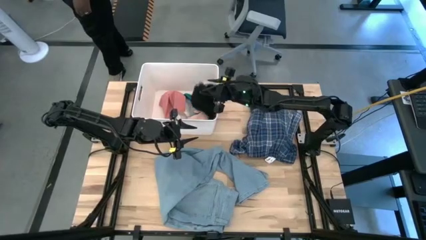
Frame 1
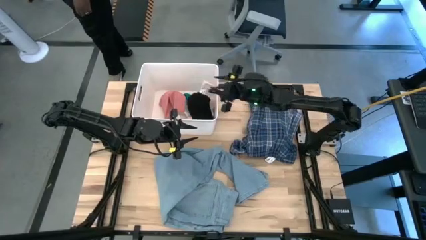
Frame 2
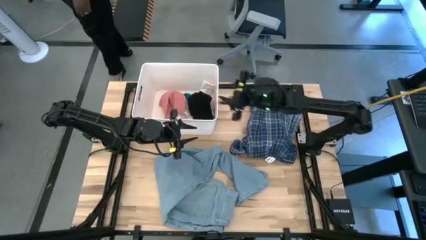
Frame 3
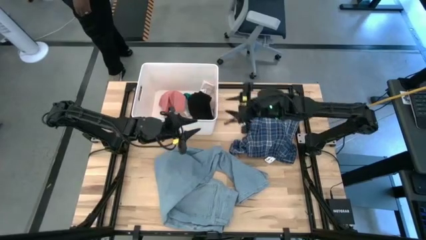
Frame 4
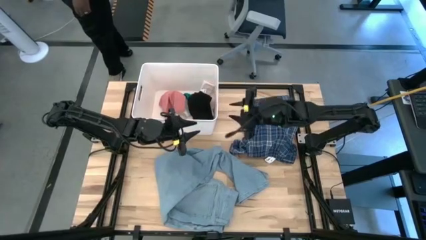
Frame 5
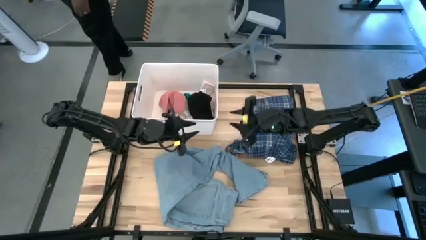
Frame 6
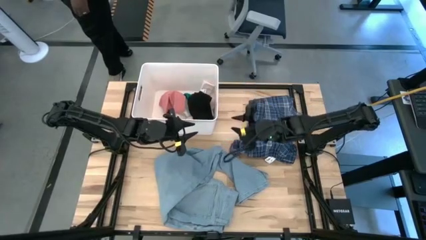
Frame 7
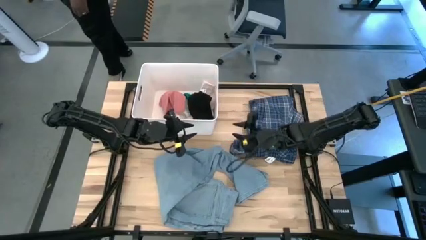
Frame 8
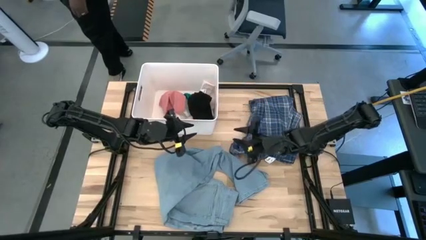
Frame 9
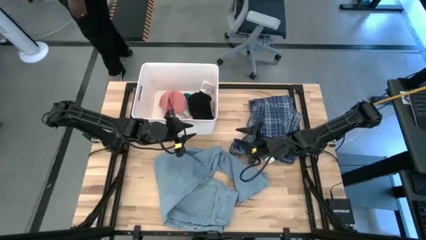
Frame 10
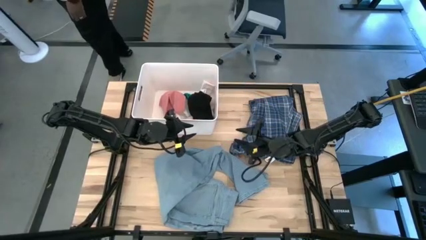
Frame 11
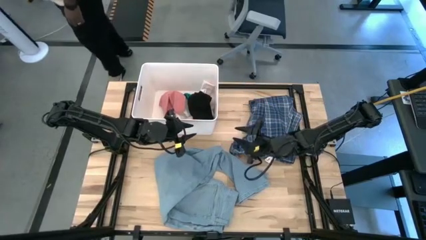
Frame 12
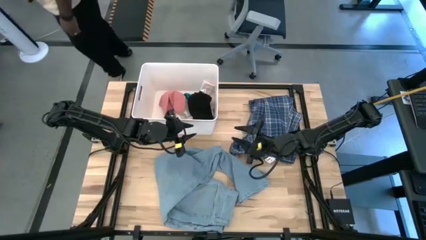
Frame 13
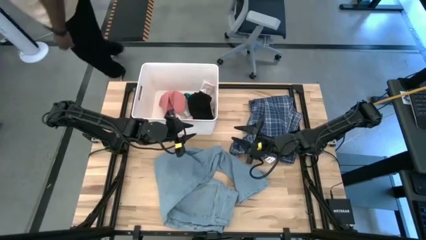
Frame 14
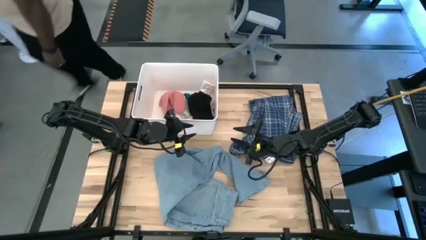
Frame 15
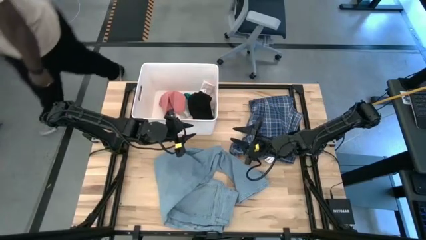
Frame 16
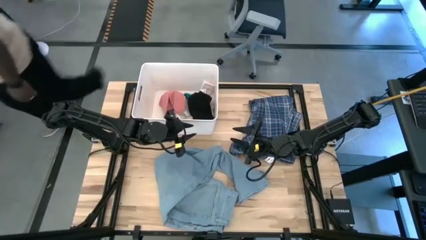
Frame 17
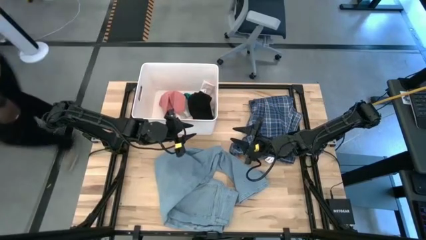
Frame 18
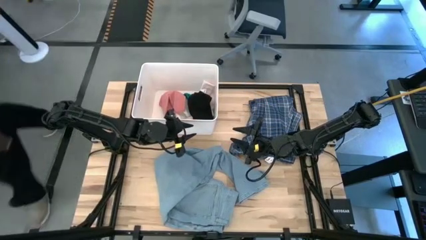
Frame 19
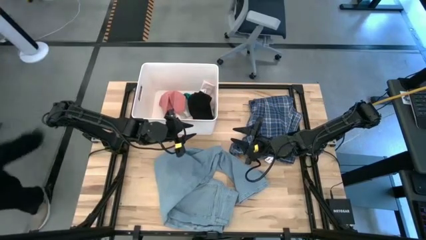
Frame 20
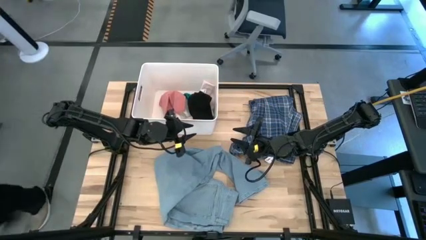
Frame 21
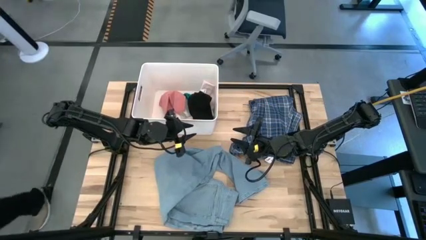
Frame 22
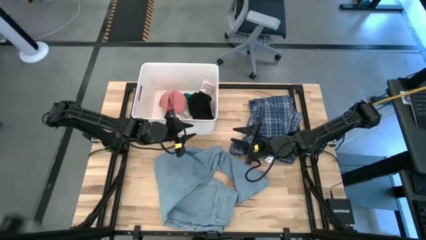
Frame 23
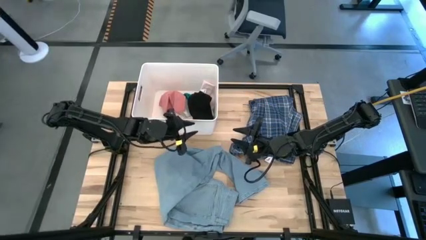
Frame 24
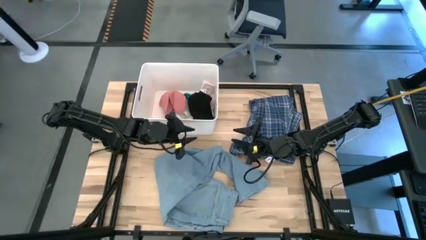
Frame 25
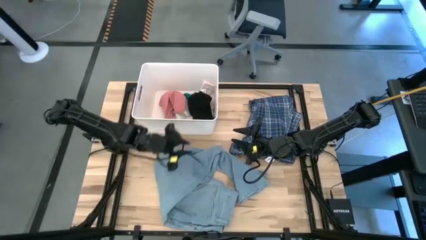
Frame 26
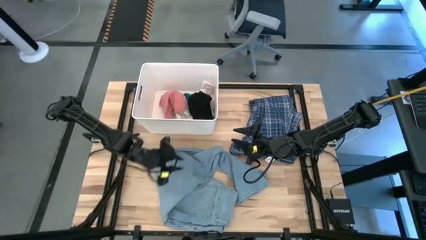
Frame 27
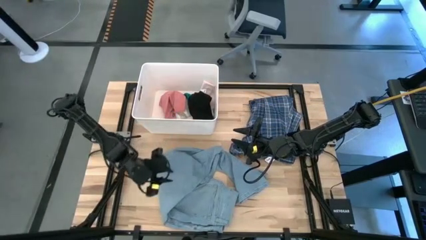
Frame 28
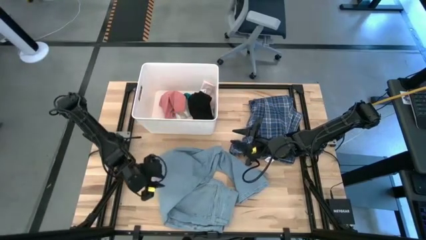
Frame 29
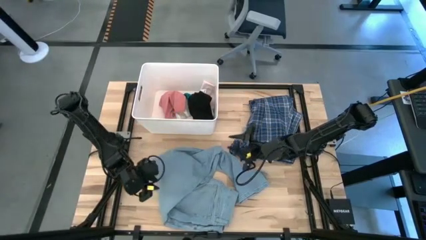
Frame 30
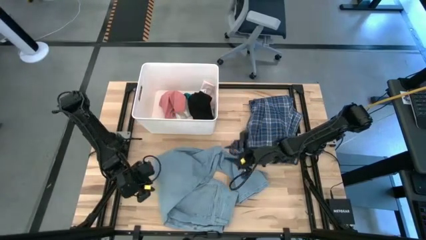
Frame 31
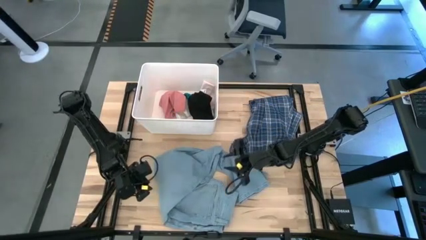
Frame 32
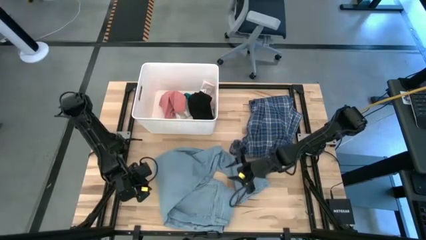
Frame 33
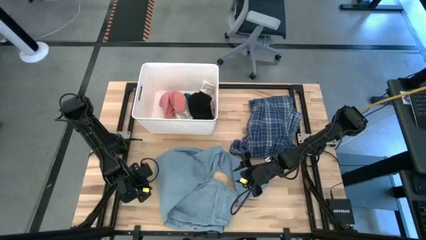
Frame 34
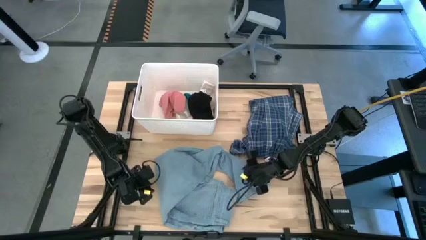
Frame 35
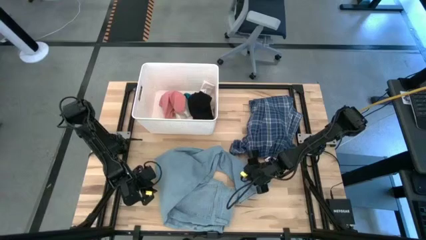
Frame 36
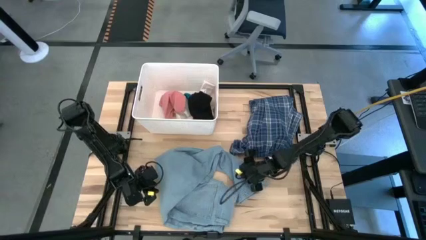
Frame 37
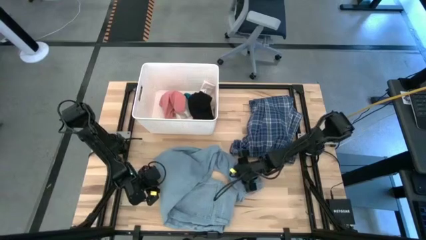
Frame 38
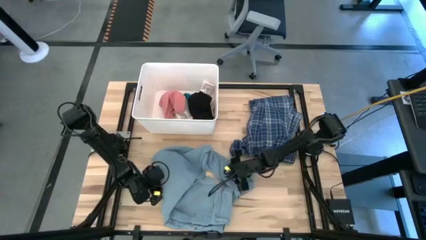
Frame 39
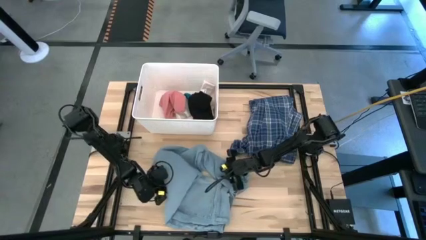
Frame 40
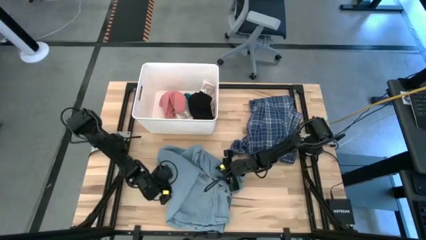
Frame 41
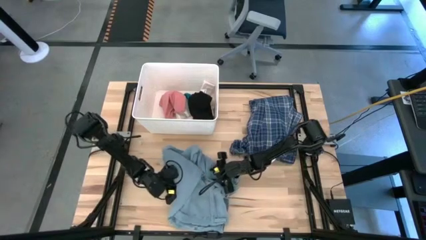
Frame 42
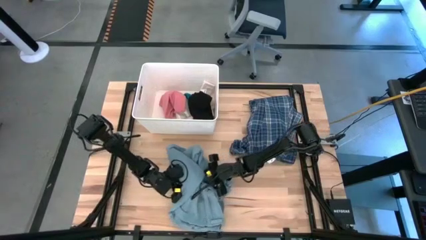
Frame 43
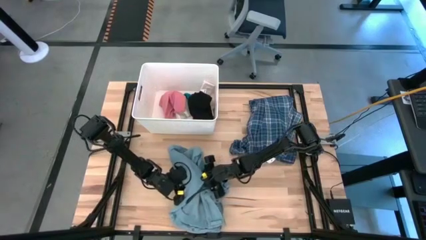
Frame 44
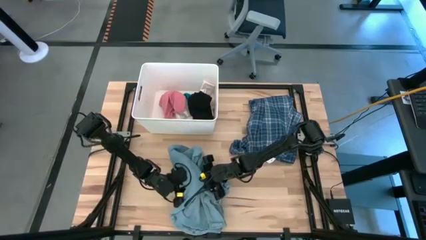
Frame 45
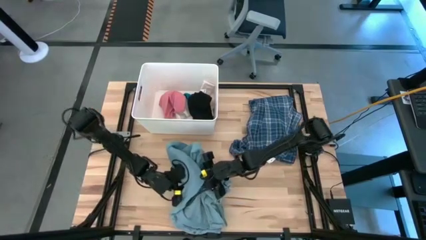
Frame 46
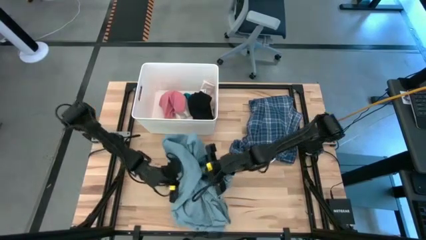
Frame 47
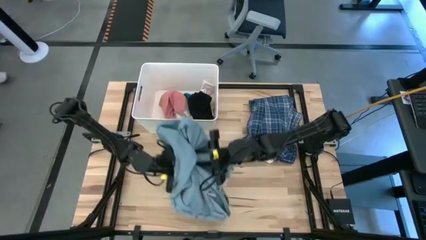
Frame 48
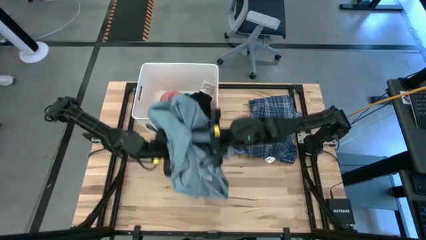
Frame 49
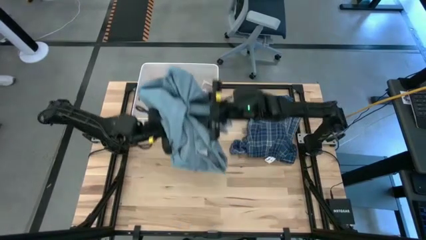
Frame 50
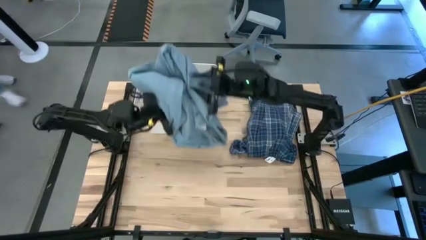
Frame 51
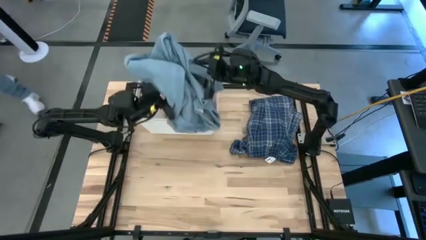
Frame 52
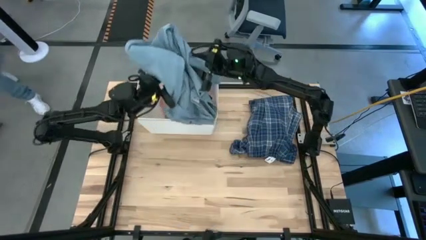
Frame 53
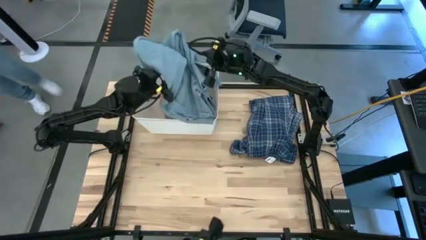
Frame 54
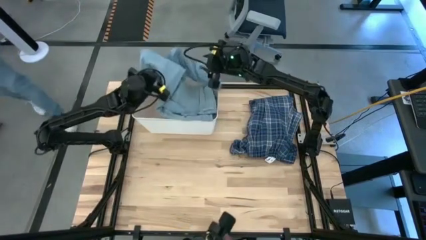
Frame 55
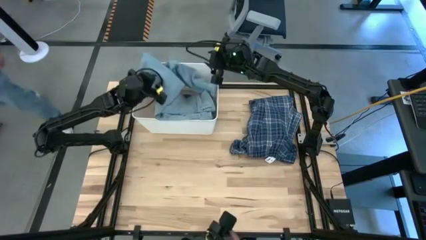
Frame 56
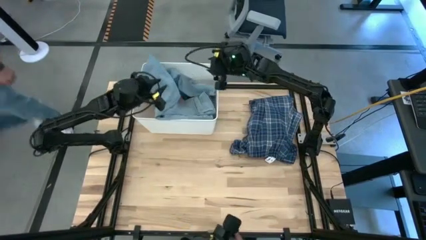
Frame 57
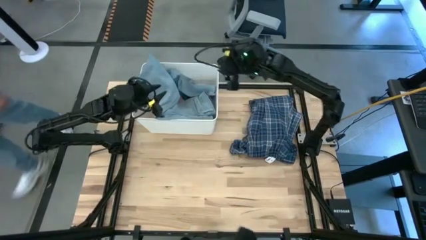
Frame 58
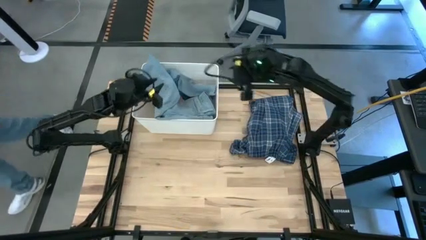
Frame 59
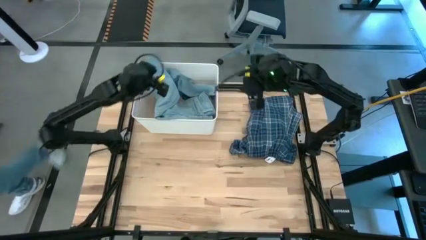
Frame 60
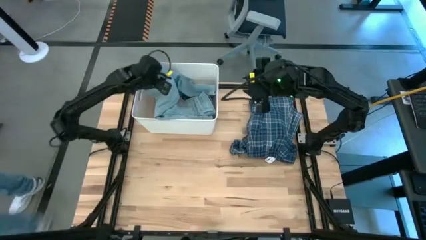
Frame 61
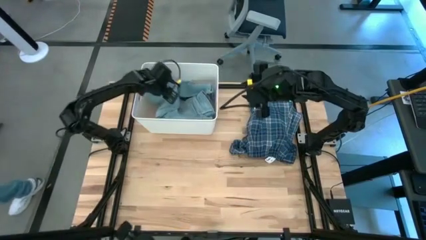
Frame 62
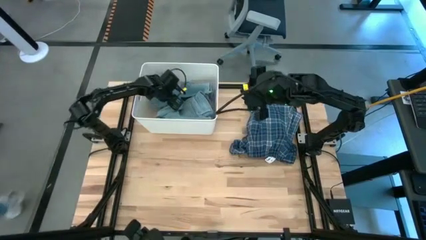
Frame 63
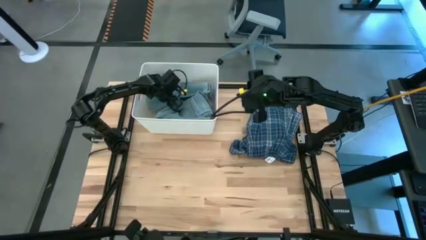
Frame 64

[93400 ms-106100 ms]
Task: Sort clothes
Put the blue pants into the white bin

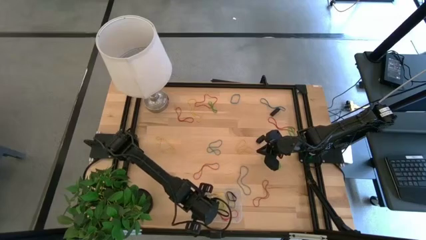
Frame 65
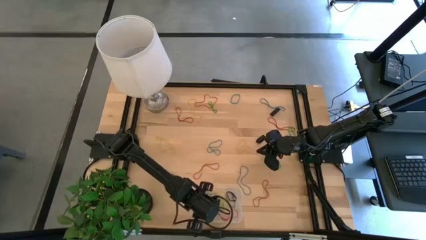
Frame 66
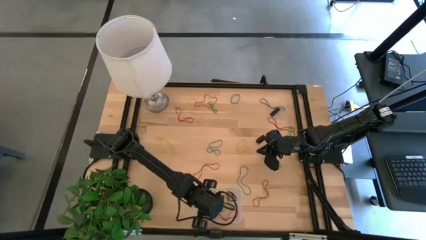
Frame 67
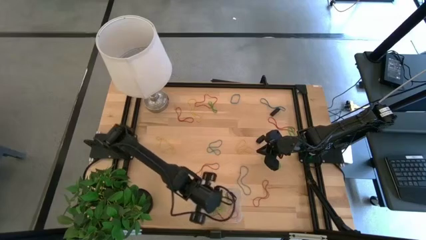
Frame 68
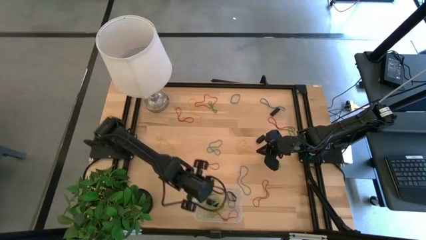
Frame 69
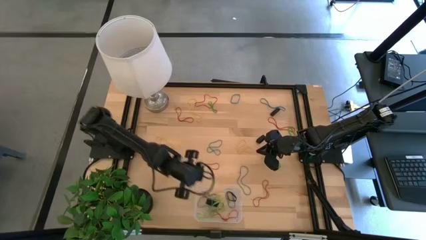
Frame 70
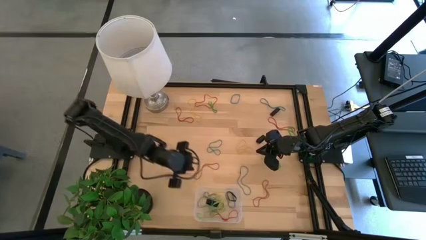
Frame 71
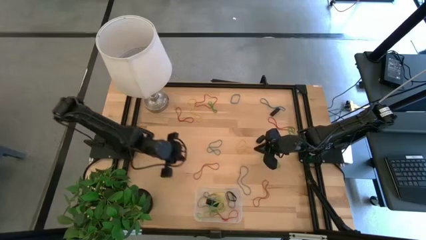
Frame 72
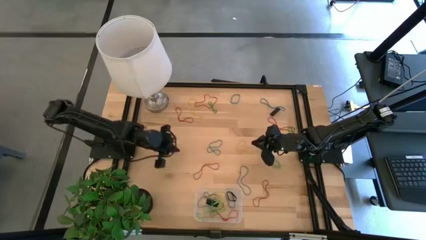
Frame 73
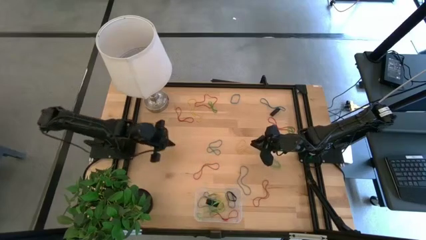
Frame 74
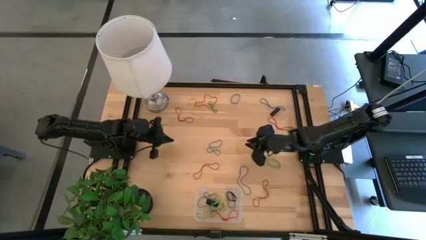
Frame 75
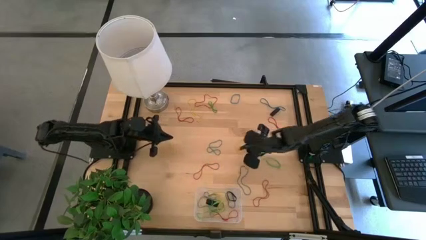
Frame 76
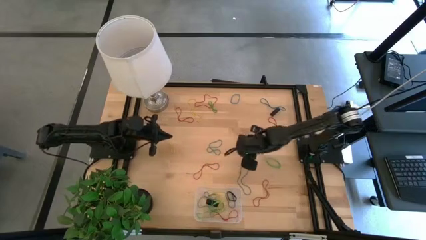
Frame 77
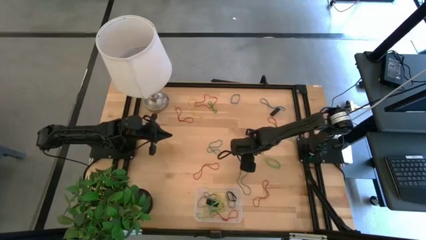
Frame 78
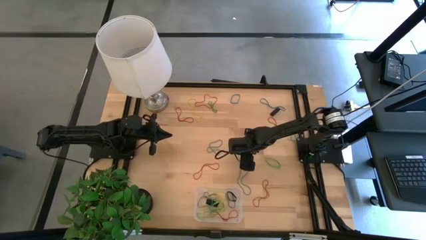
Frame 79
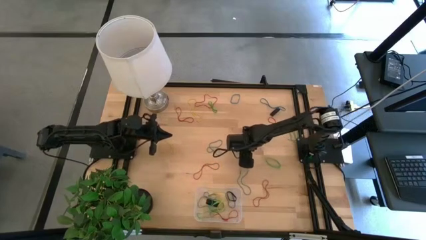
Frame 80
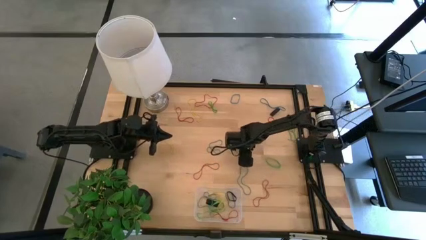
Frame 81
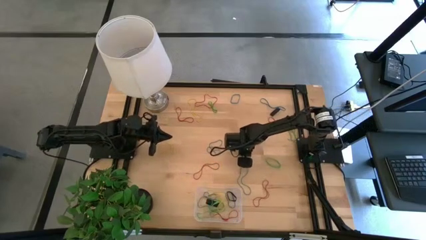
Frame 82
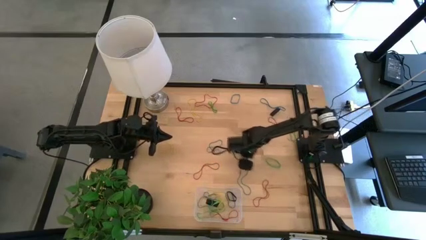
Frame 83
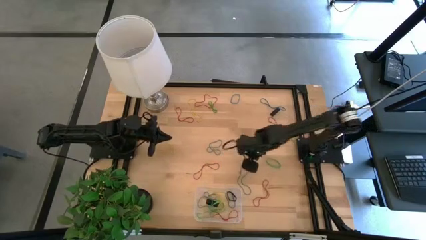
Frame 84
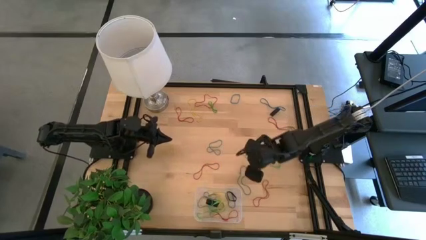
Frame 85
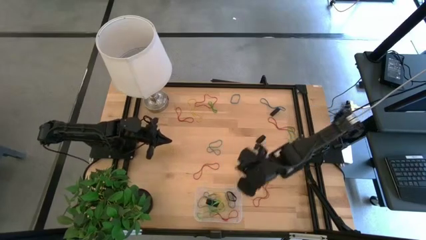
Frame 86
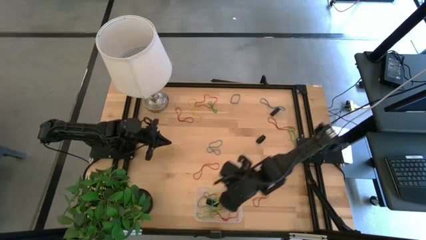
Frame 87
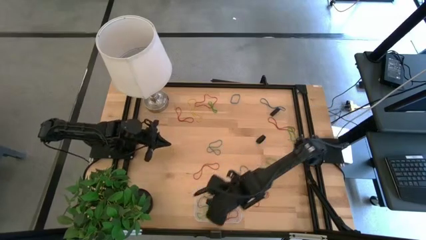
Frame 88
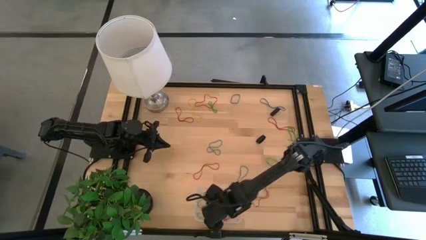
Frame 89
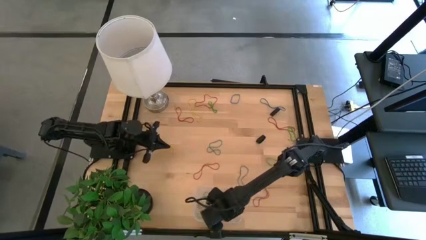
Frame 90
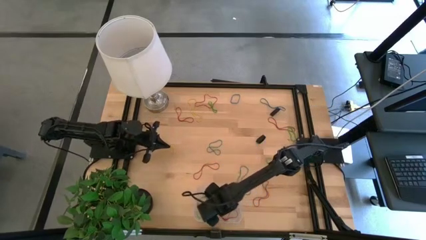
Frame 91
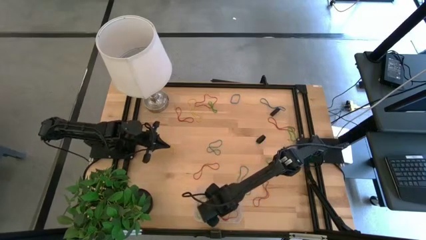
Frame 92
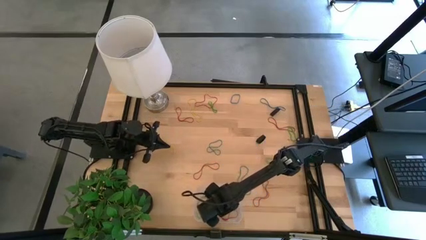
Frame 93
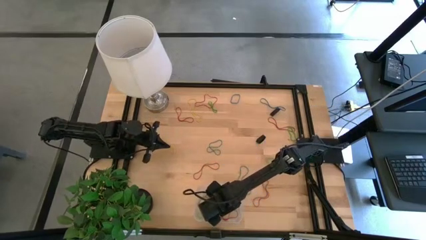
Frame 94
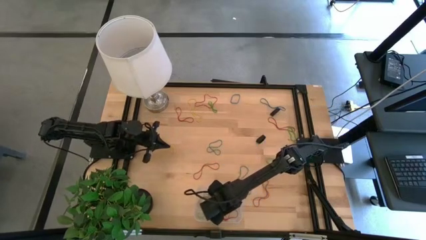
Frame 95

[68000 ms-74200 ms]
Task: Pick and place rubber bands into bin
Put the yellow rubber band into the transparent bin
